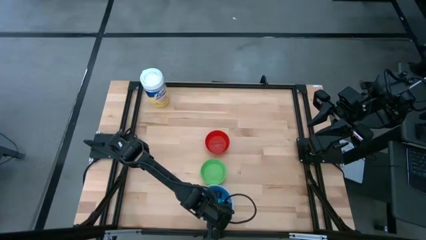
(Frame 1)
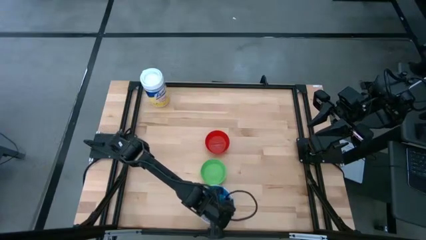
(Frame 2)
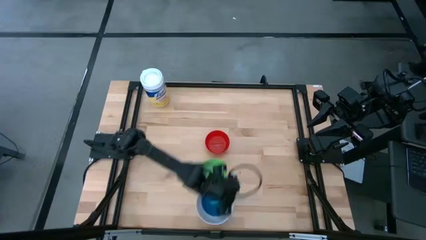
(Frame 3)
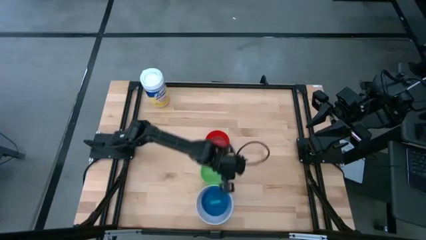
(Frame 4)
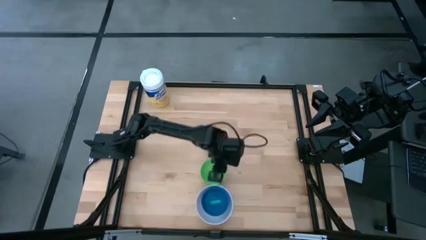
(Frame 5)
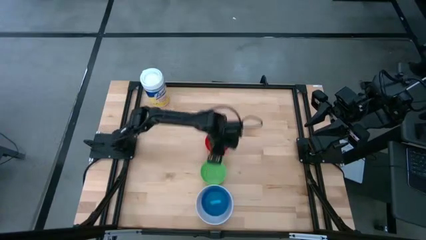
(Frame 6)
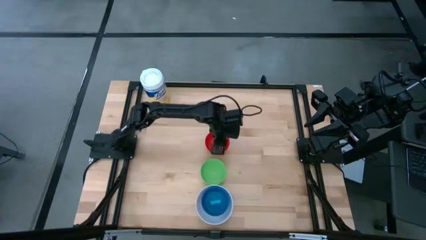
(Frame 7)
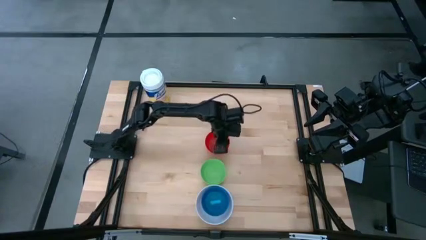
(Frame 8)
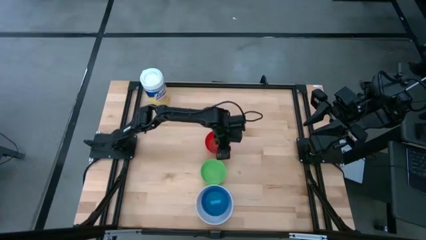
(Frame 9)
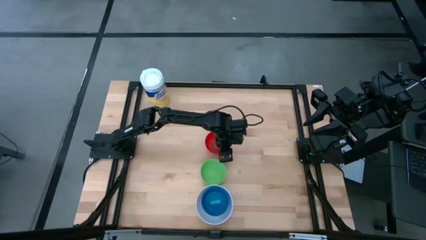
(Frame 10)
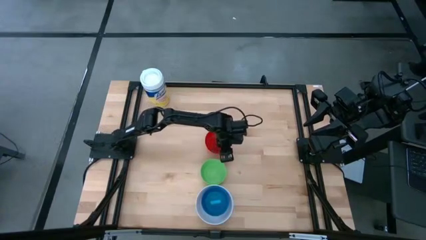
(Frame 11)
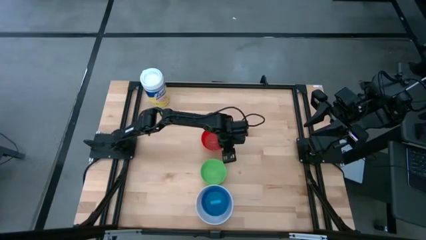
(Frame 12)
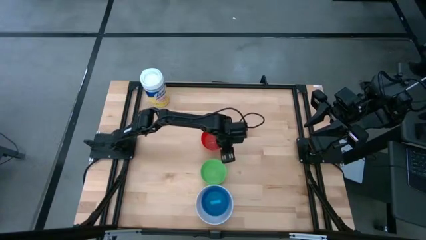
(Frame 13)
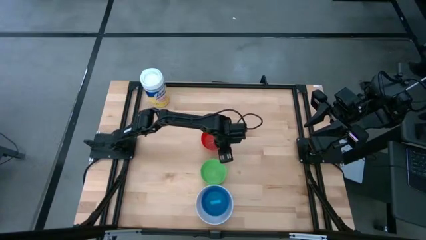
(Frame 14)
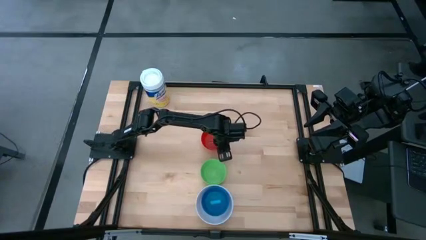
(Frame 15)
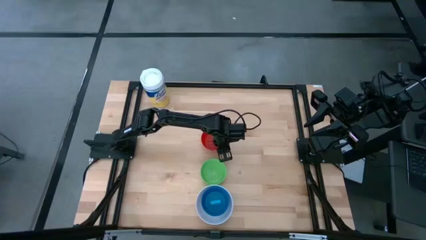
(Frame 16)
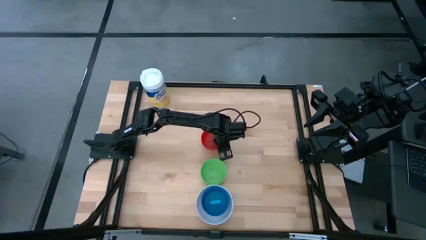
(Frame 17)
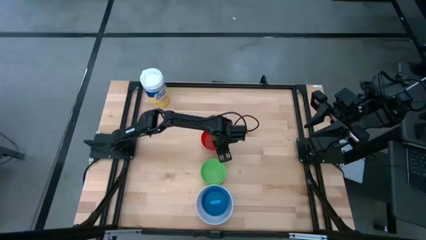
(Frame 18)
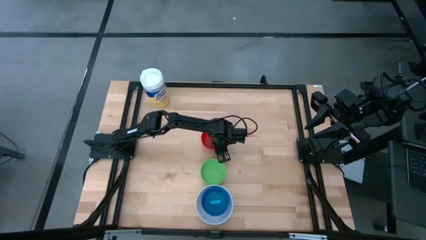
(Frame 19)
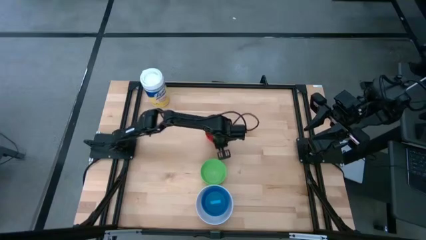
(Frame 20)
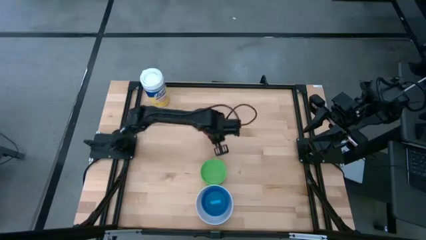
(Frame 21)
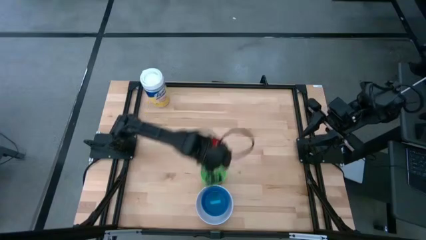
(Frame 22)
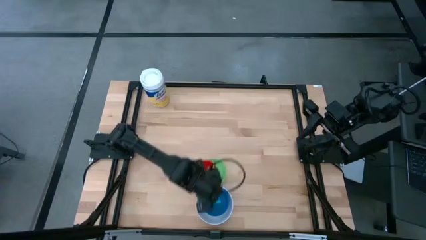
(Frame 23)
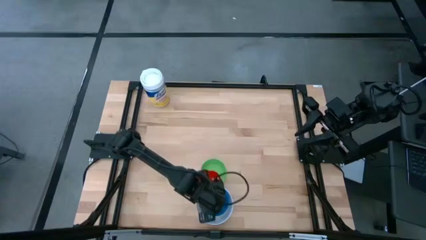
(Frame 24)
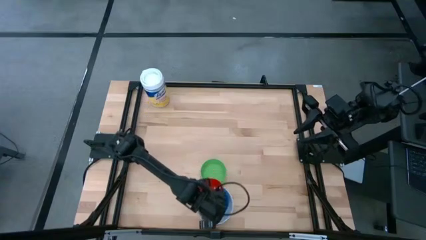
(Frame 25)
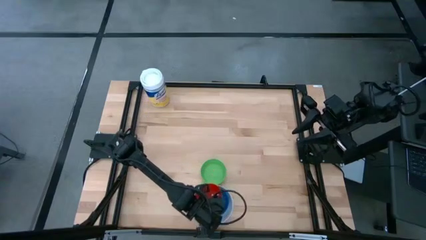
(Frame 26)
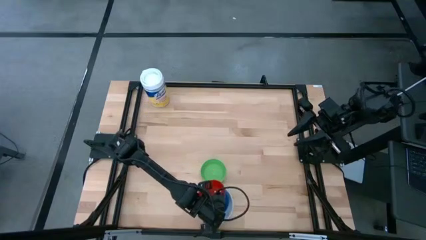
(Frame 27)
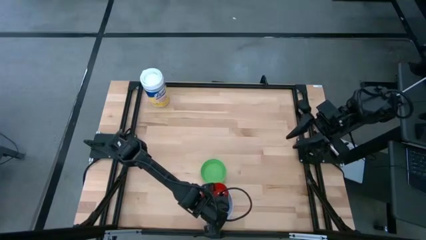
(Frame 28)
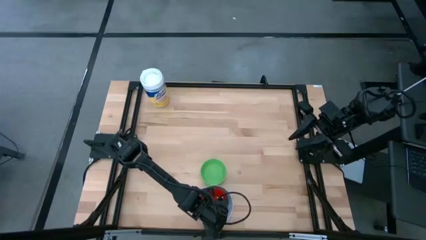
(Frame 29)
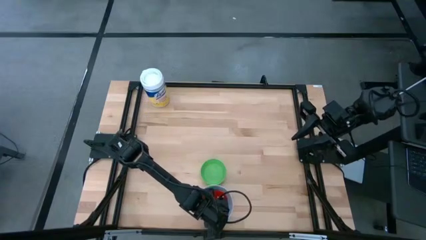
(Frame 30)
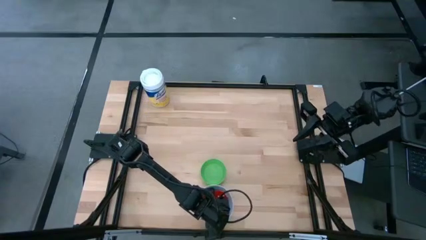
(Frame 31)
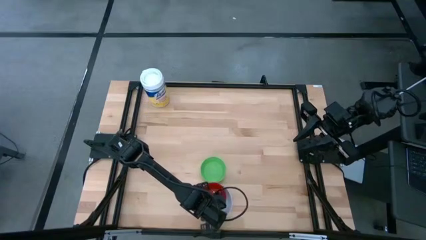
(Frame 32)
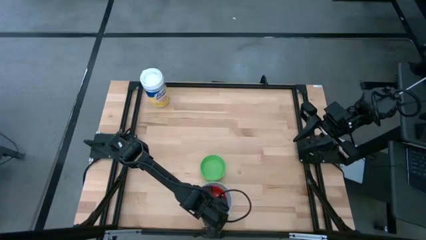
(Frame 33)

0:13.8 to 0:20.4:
Put the red bowl on the blue bowl

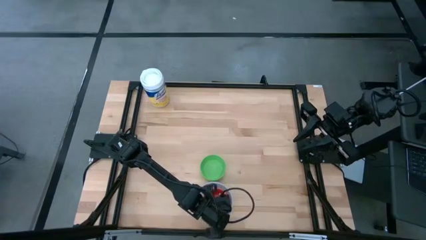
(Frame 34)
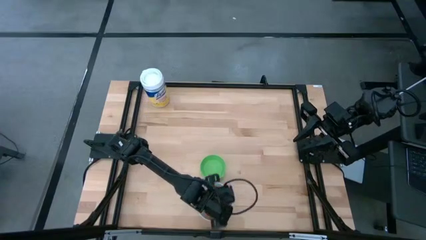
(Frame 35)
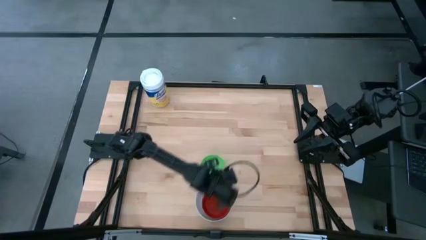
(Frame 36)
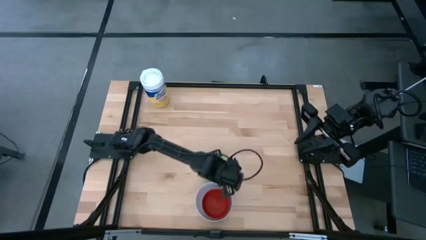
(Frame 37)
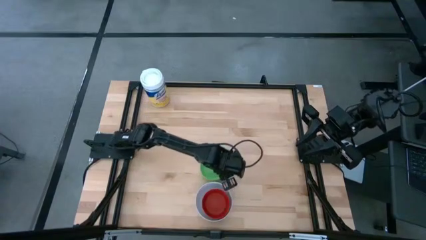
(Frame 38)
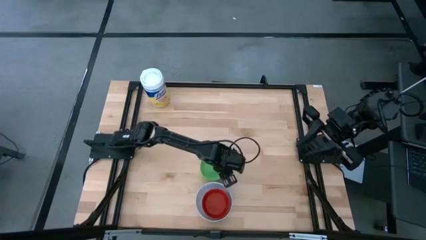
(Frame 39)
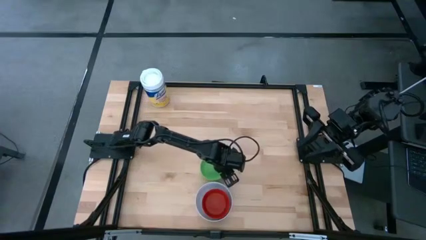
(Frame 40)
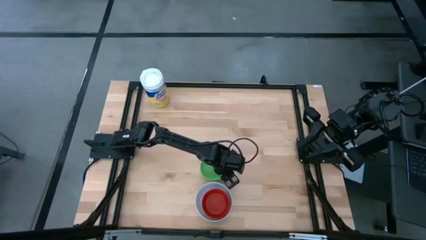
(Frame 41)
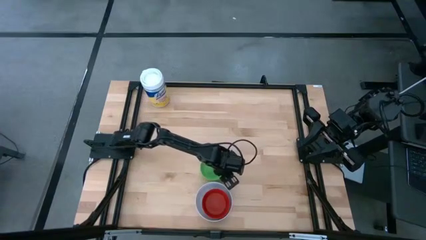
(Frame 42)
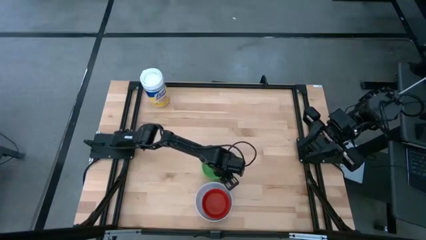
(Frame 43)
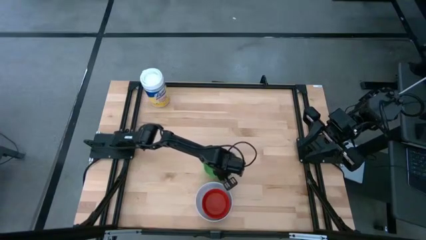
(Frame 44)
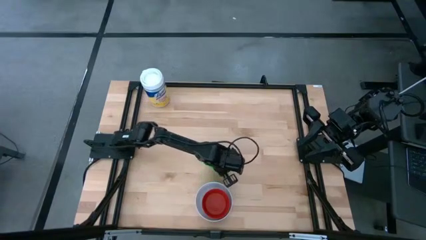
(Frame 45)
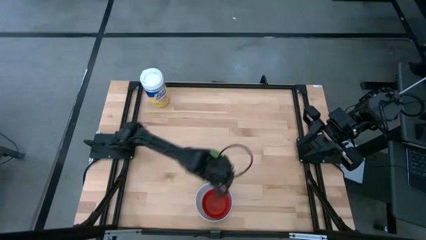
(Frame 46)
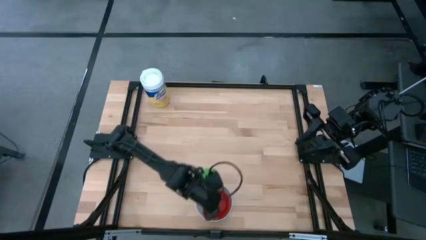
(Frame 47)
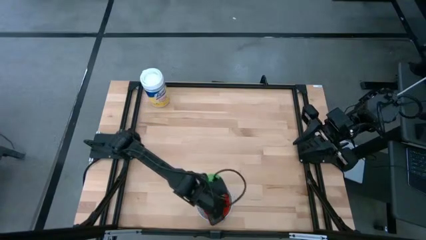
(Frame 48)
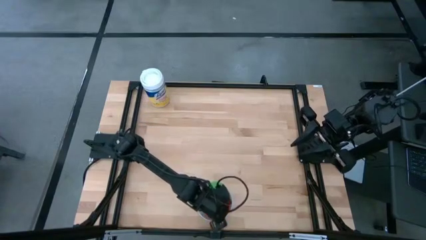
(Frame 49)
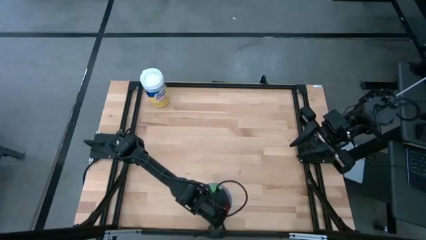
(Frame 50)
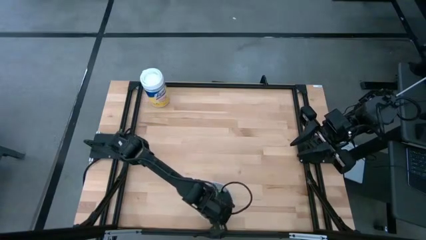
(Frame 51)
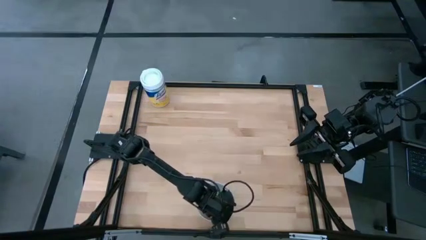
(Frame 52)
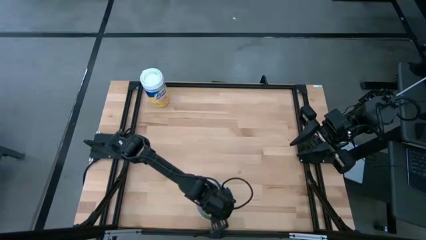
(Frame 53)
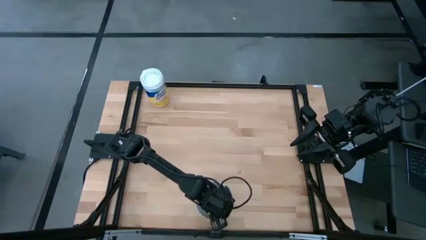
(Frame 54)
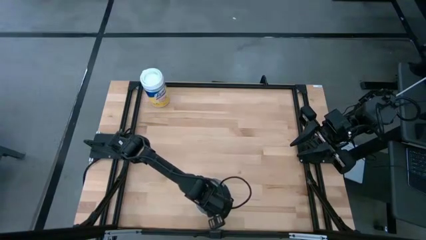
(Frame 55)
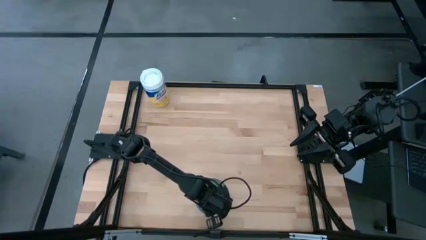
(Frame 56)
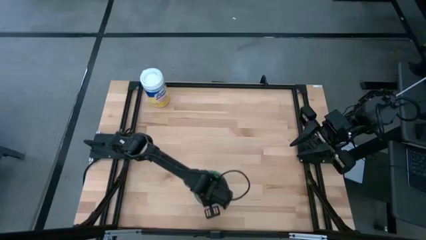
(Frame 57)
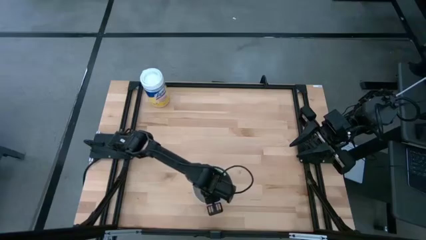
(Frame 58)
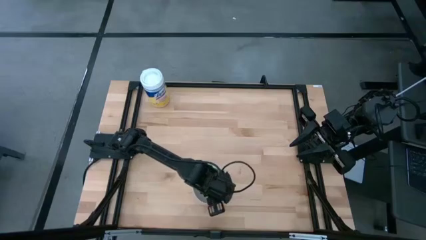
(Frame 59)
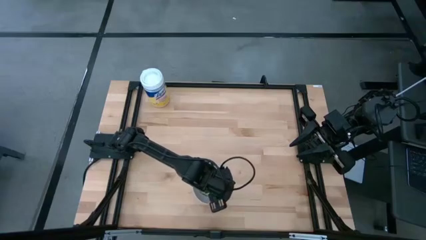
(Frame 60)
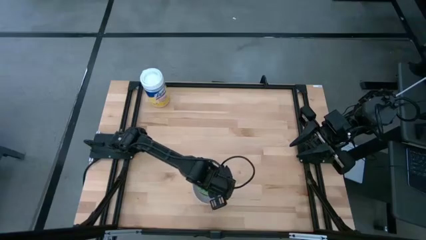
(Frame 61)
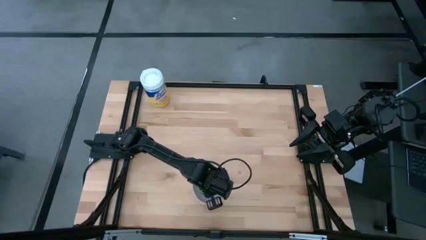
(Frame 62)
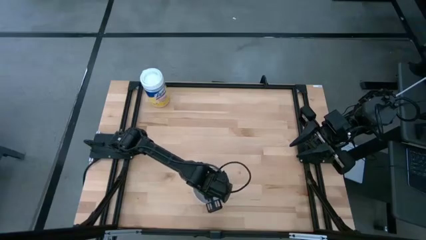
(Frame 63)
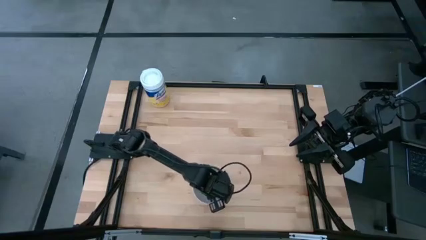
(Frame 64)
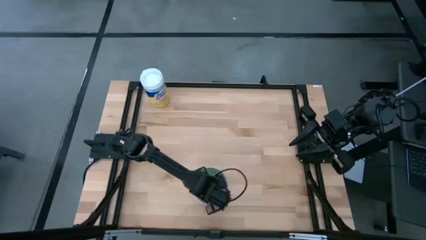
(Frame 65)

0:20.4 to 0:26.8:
Put the green bowl on the red bowl

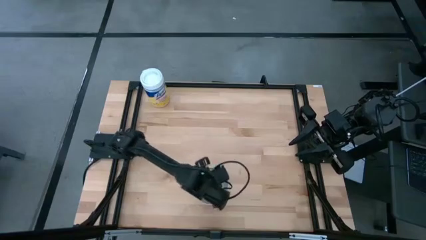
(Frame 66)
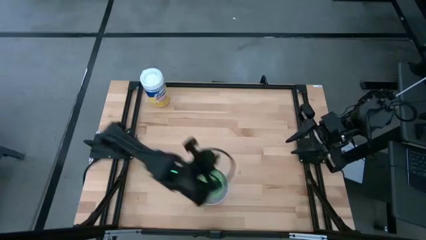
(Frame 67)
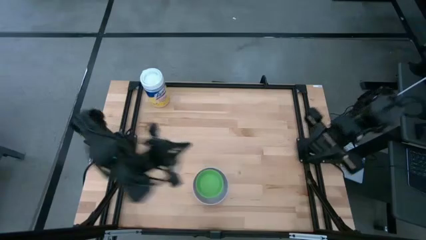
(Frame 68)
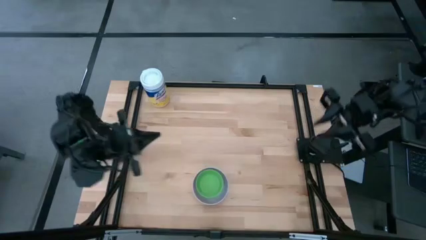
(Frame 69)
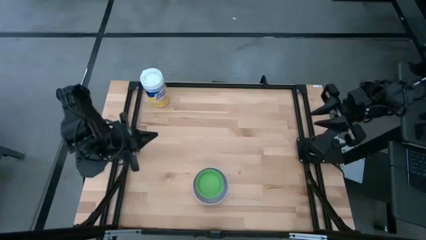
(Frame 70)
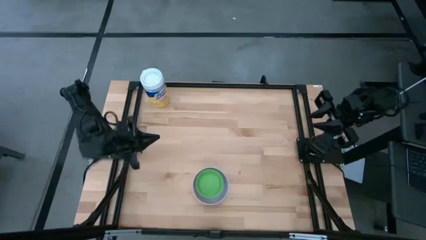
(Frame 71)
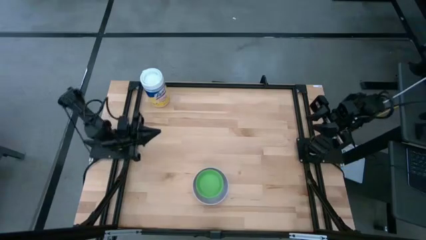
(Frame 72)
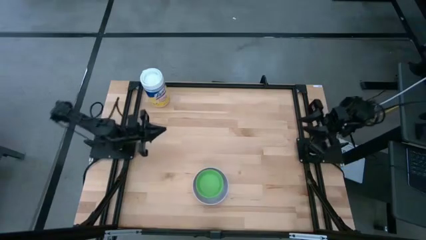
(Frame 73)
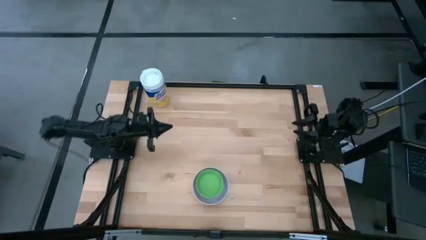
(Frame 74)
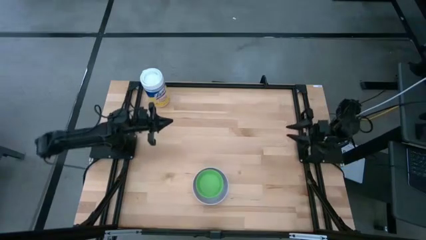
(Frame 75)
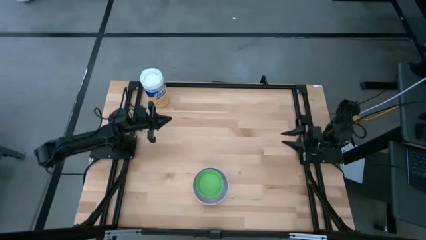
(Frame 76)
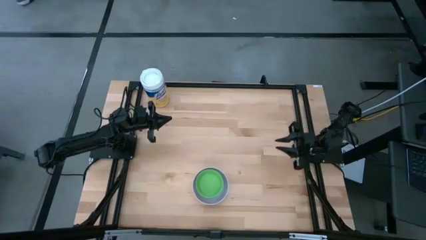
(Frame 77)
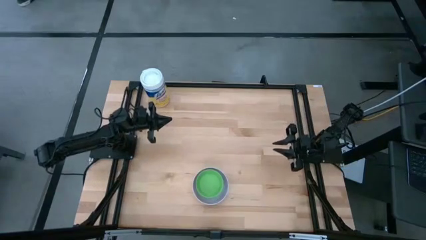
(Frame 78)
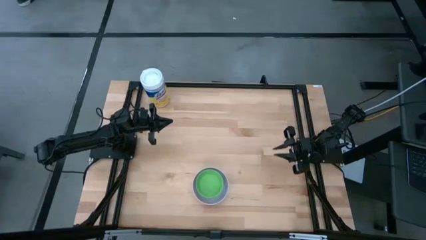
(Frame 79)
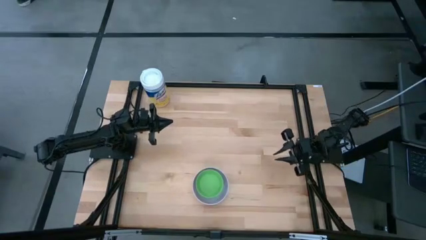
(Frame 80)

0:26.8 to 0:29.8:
Return to Home Position
